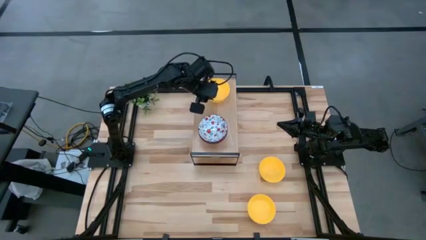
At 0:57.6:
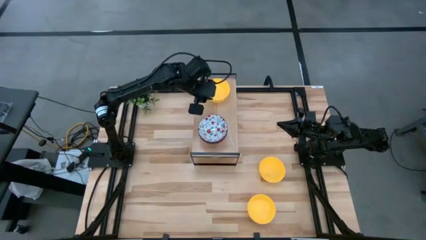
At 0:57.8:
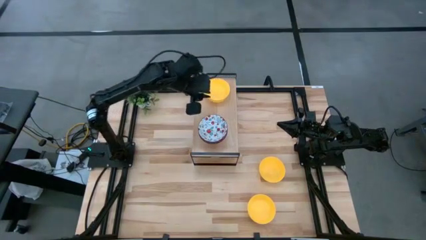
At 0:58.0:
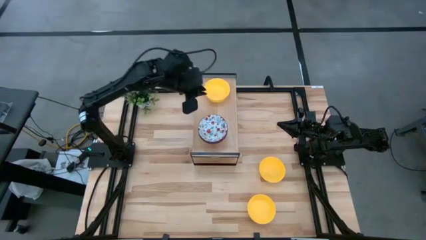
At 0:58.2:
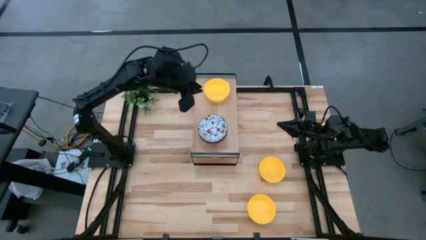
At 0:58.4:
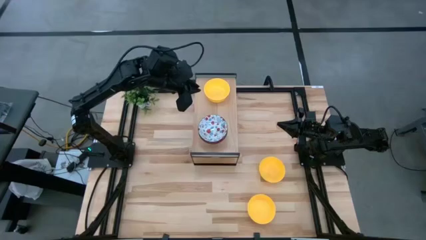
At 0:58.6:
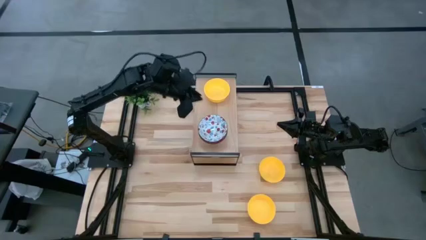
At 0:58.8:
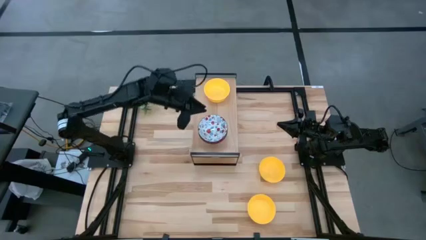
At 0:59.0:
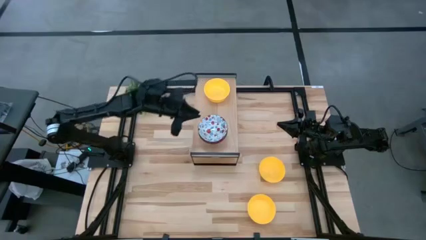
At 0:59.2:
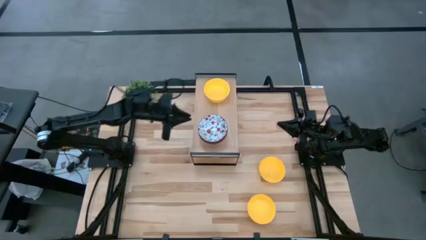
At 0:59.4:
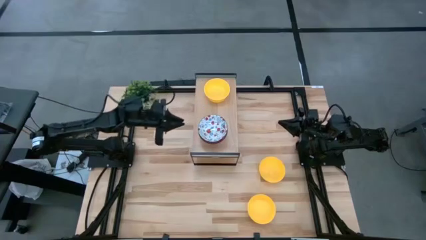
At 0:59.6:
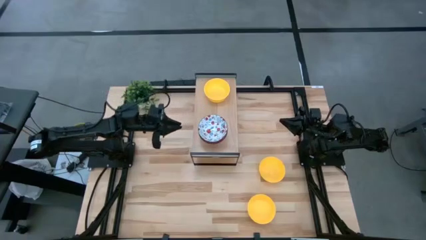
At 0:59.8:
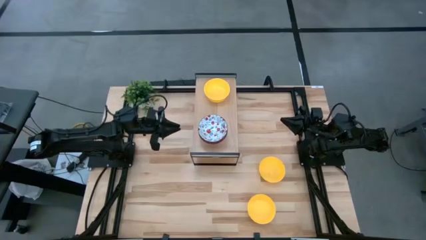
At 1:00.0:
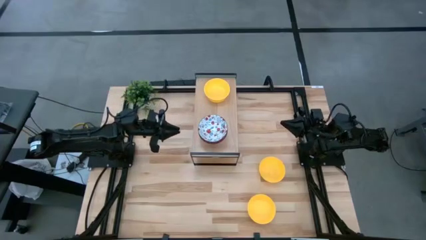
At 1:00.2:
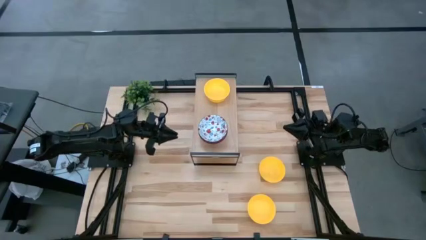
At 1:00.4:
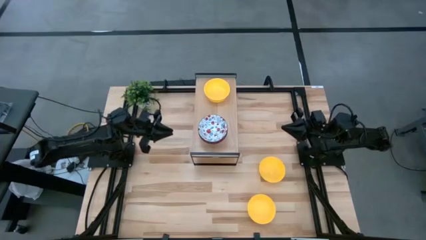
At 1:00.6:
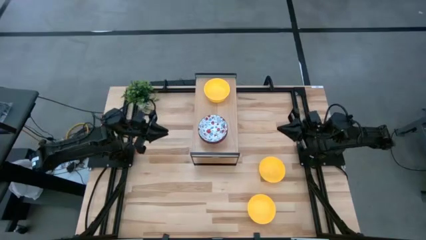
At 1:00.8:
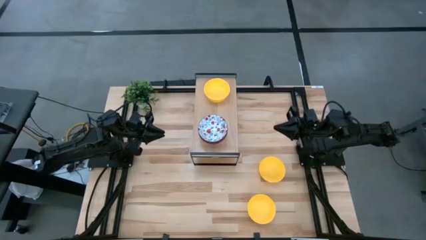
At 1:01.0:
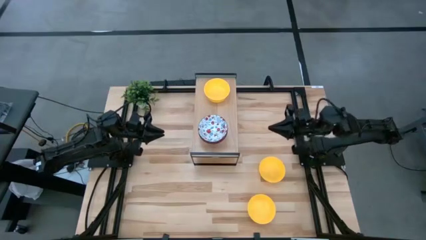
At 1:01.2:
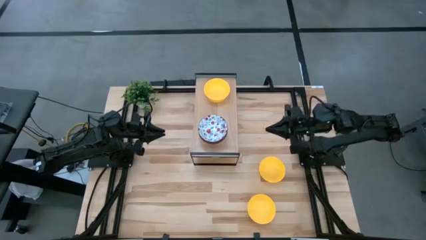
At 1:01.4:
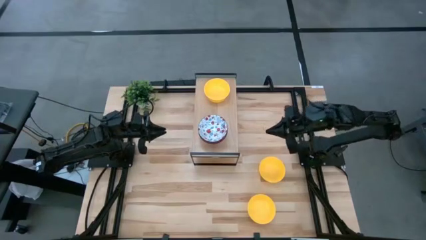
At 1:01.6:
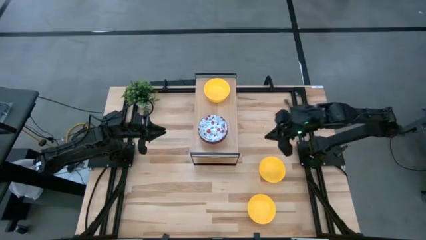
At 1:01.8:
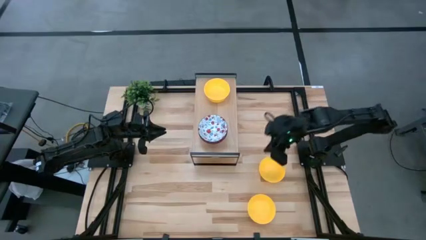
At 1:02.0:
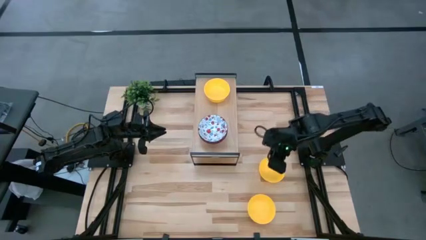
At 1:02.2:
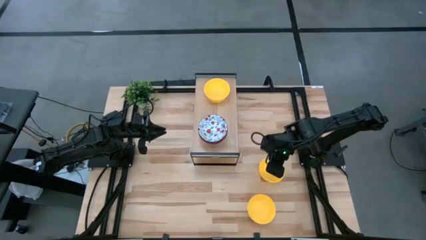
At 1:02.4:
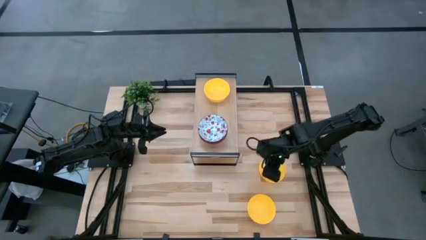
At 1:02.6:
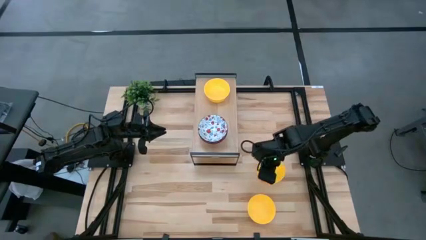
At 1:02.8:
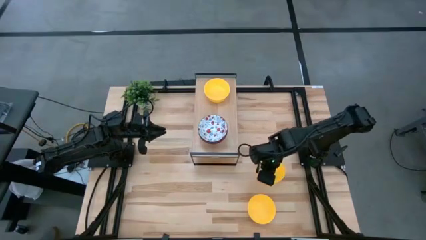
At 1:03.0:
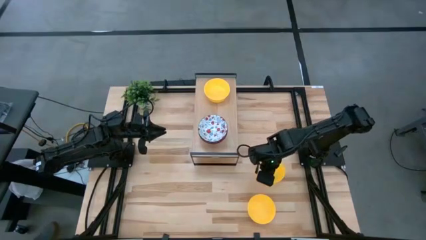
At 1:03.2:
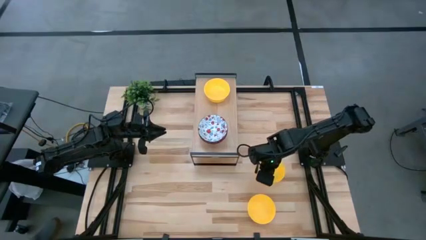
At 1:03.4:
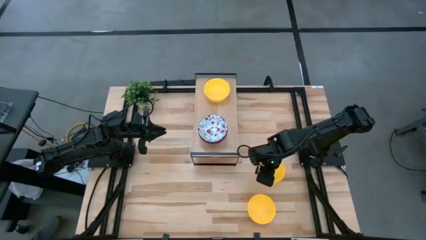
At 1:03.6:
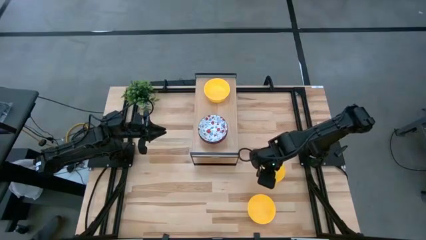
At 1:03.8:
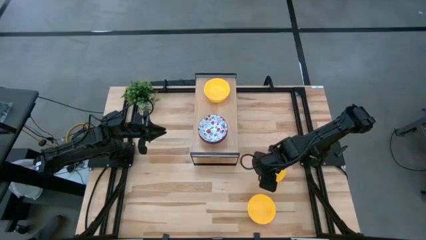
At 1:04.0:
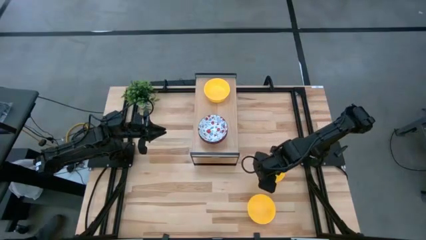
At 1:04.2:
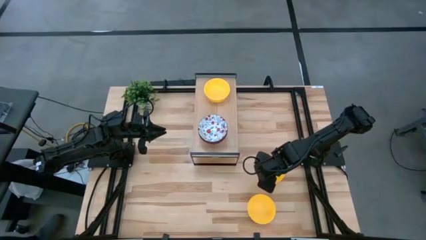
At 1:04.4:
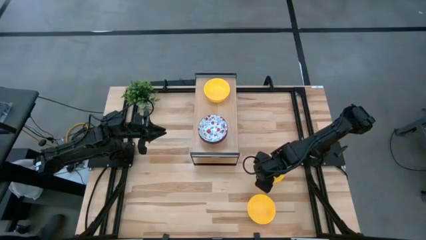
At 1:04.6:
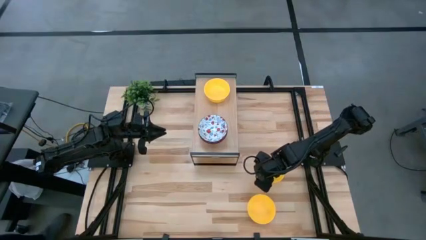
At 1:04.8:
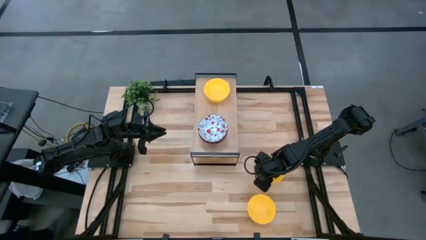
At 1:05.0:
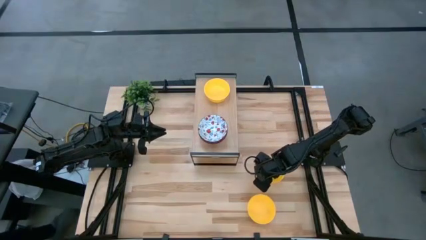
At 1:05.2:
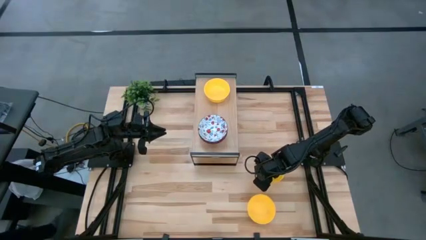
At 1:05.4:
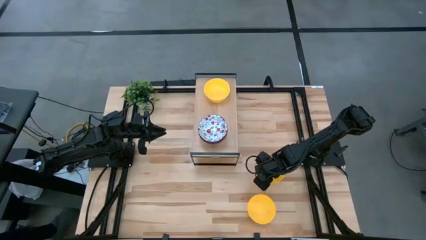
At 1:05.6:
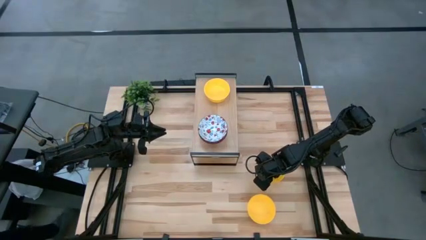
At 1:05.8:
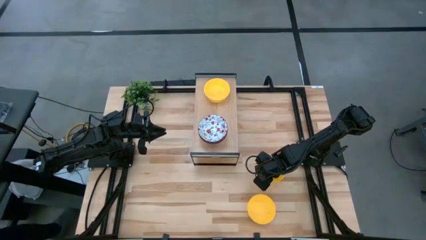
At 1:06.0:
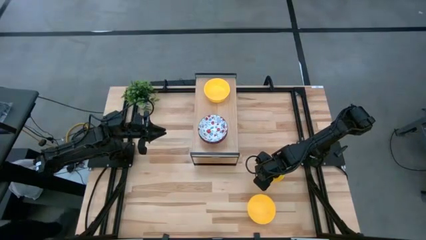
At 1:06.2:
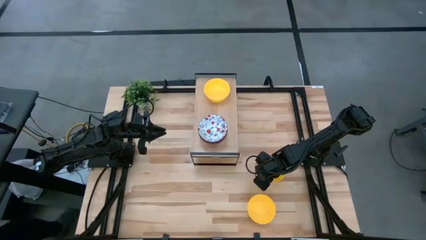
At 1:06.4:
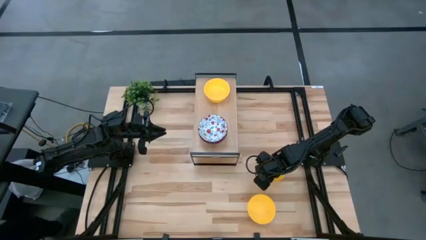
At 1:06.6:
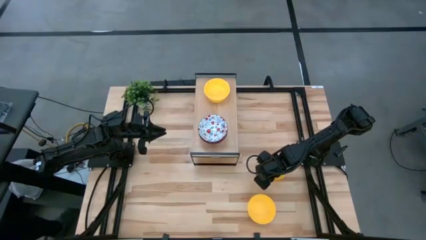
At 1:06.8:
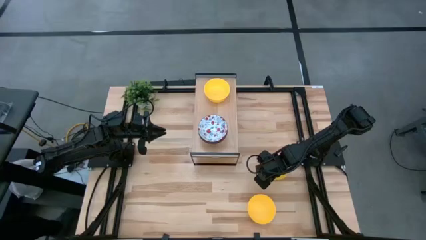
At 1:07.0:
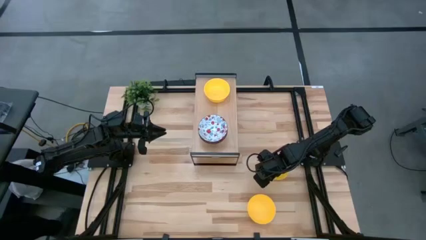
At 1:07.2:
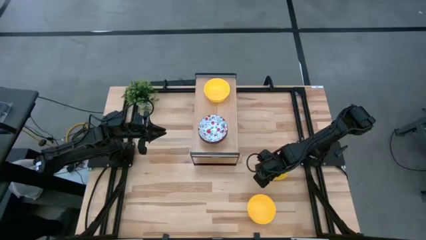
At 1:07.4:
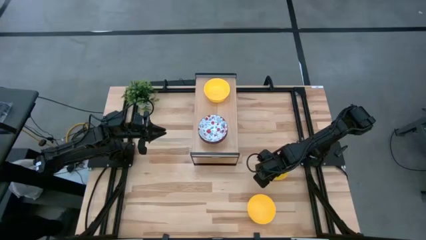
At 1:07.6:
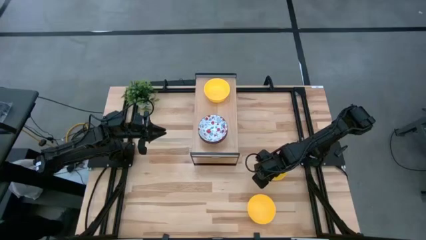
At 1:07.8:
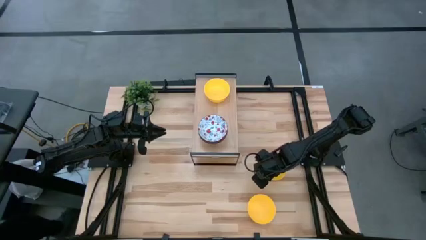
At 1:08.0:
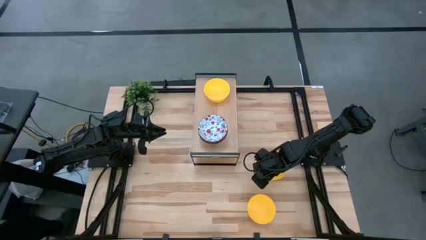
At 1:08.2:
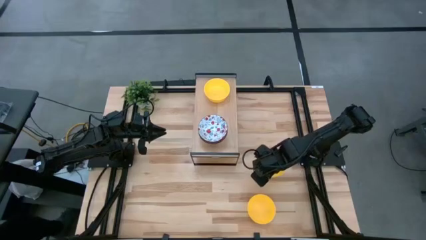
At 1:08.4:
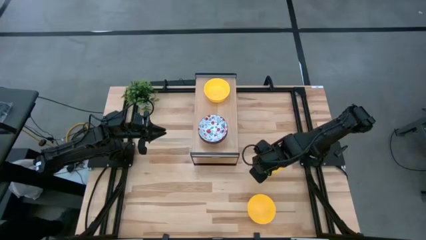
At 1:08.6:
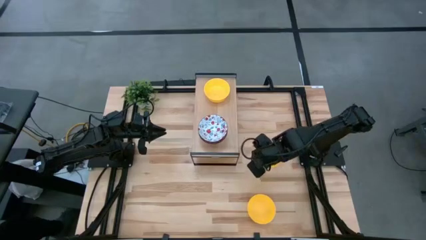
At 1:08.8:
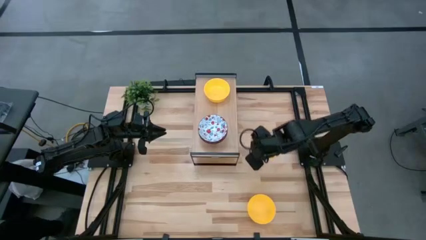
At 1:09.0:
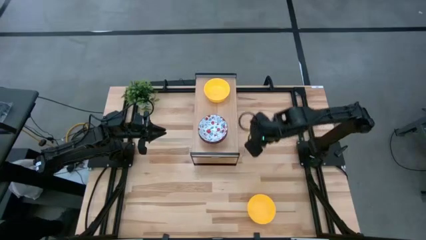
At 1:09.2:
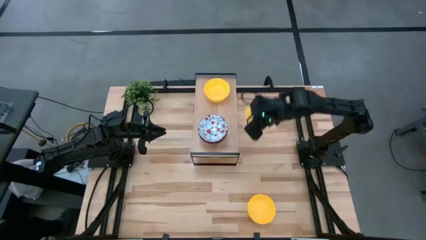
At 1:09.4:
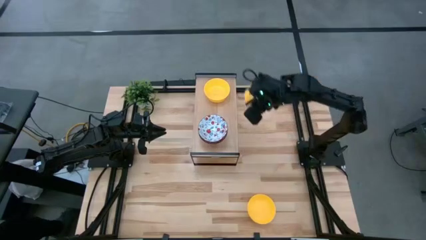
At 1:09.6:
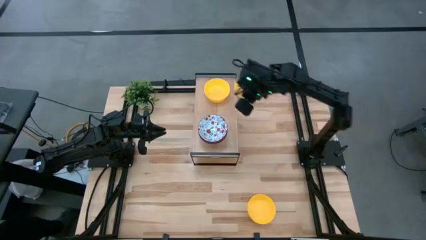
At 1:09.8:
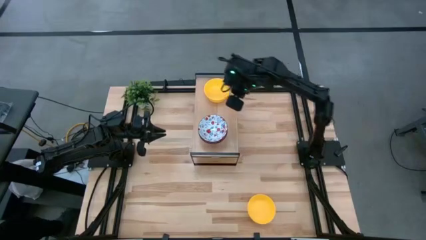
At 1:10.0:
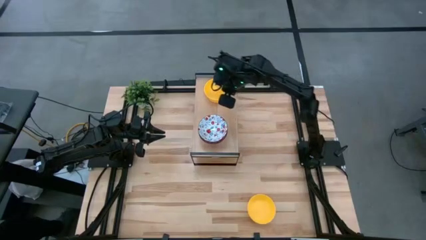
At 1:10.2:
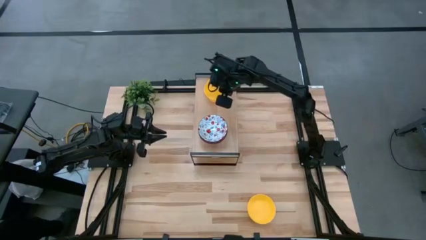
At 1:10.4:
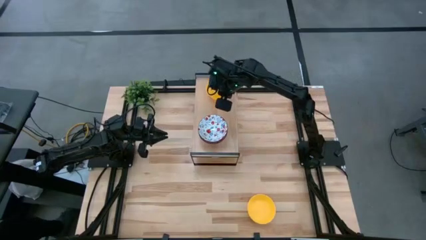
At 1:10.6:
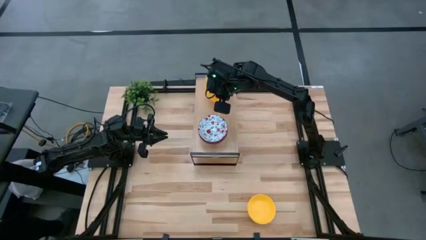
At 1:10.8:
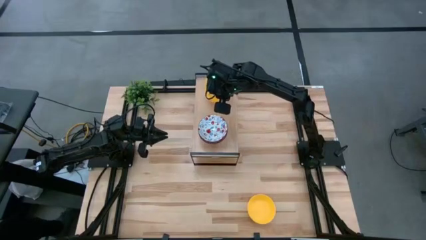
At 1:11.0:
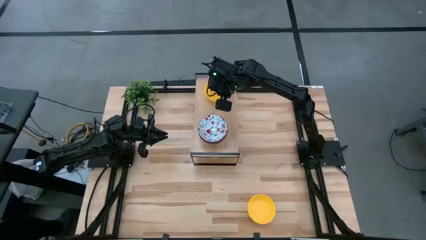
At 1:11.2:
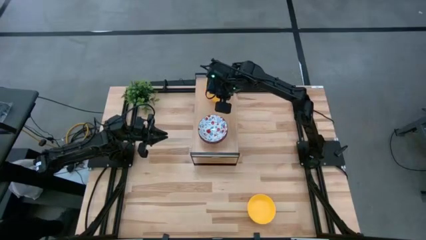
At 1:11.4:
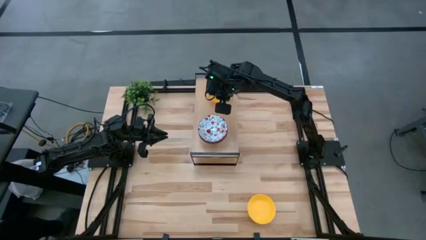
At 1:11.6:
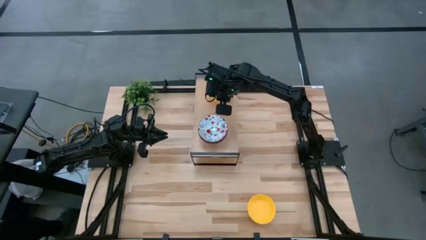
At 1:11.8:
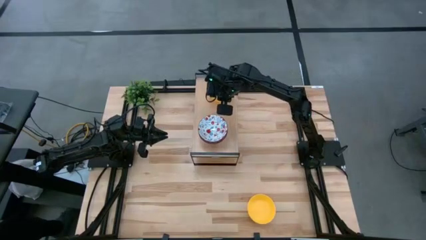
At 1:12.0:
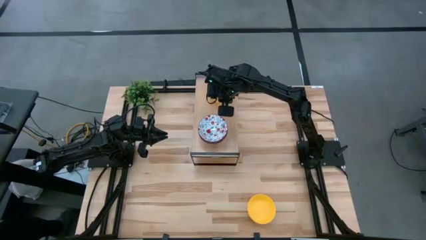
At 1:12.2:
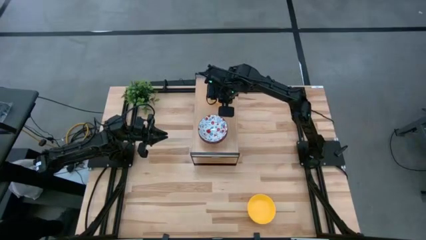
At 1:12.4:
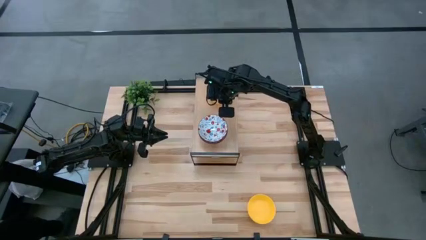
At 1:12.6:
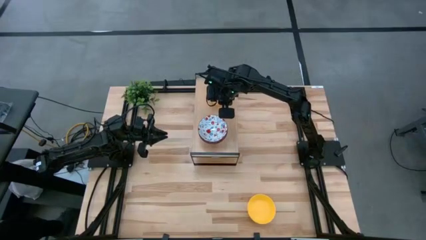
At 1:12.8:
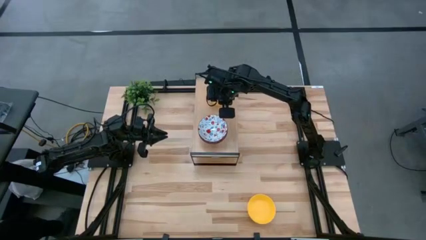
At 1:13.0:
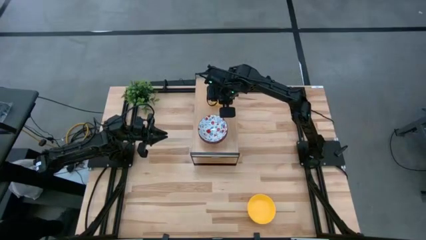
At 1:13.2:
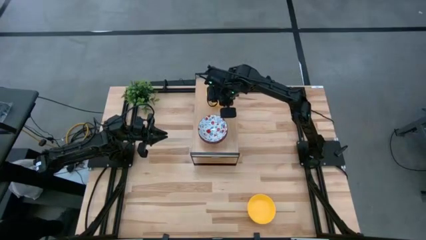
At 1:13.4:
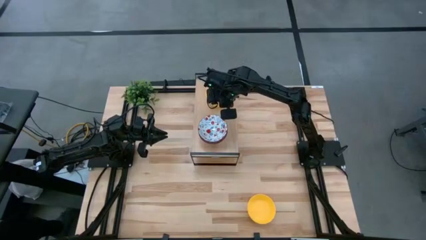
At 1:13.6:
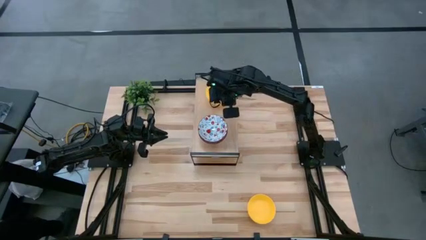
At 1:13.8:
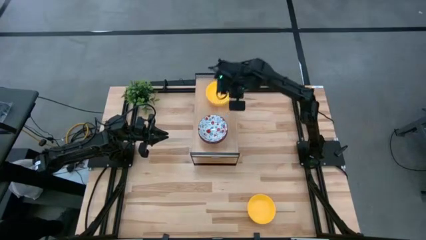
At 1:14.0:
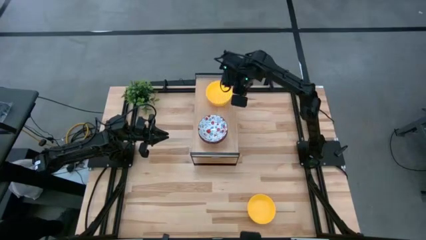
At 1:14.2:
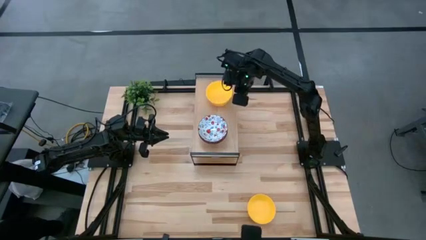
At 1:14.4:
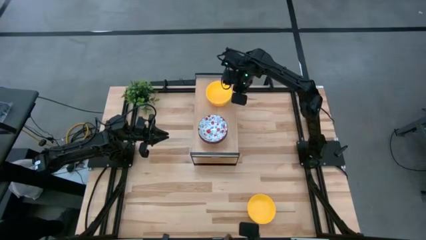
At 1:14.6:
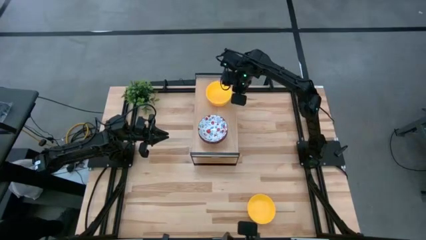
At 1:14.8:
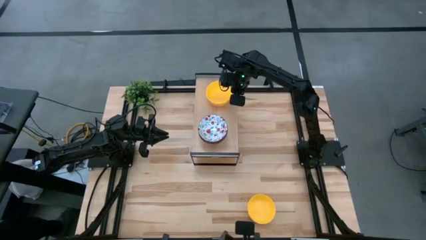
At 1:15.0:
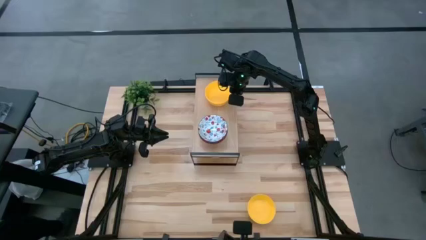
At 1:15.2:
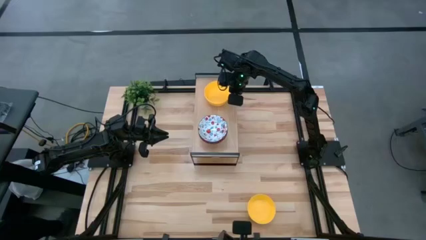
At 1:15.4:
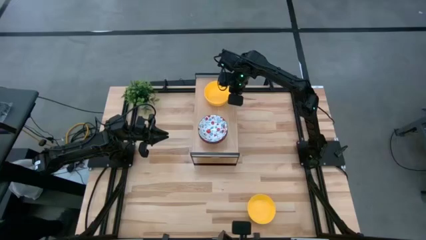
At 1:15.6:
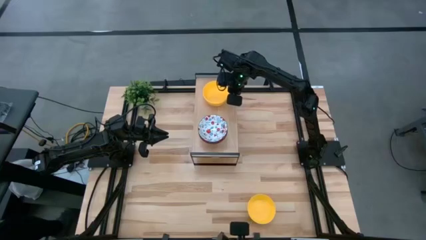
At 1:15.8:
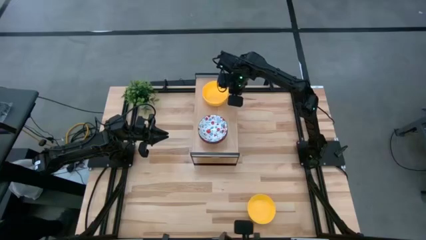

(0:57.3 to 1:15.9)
Task: Pick & Place Mini bowls
Stack the top yellow bowl on the yellow bowl on the shelf
